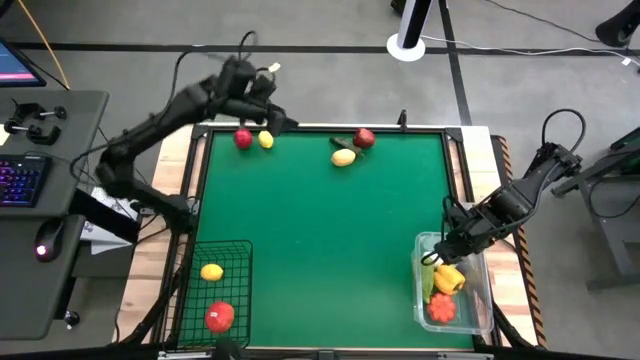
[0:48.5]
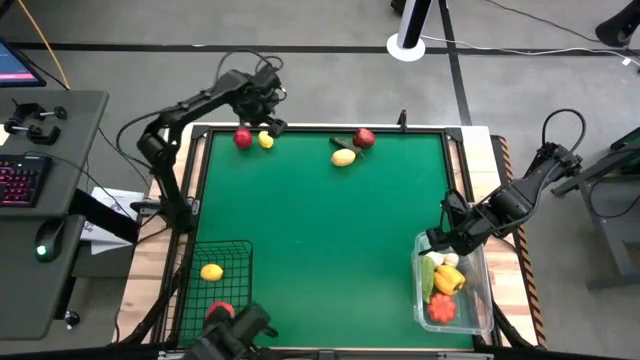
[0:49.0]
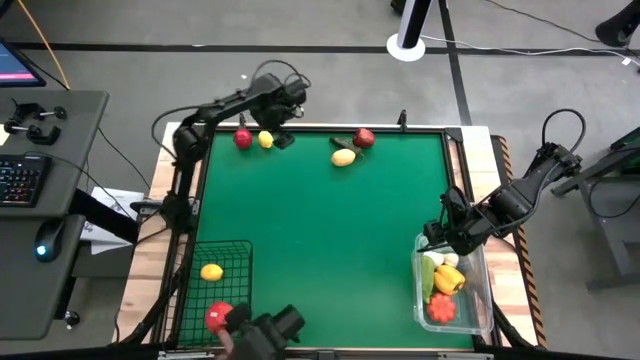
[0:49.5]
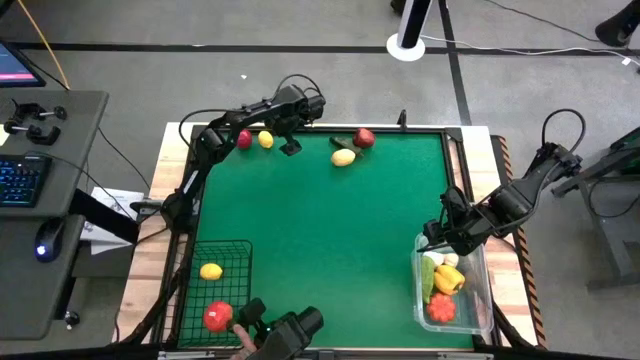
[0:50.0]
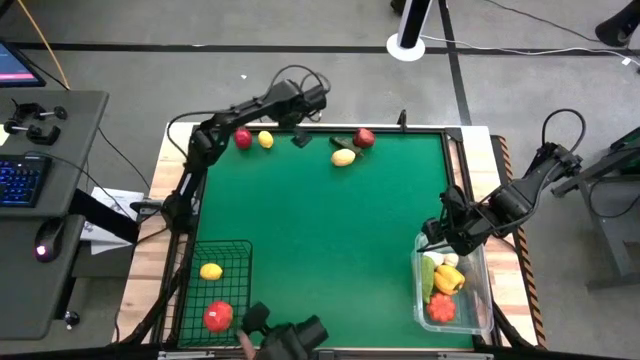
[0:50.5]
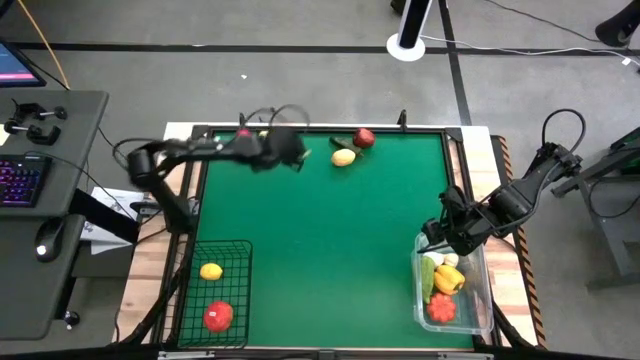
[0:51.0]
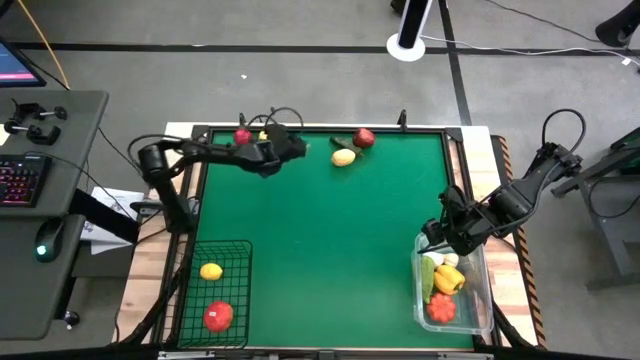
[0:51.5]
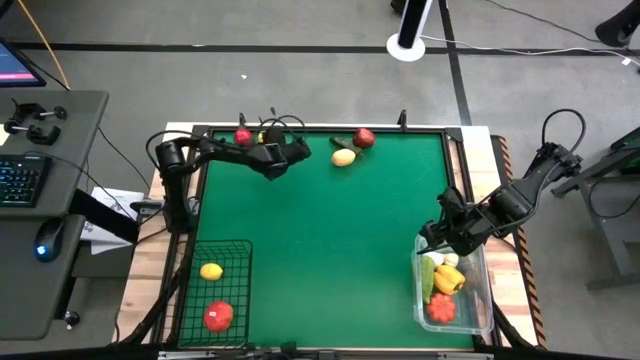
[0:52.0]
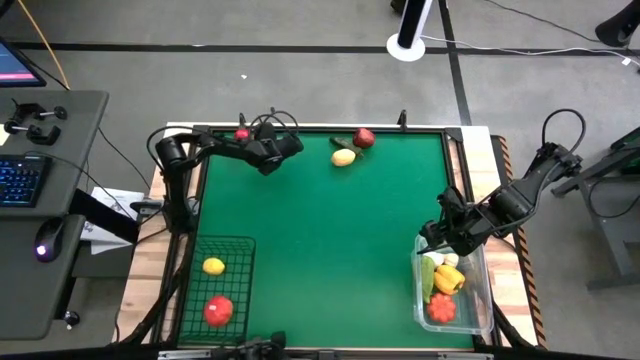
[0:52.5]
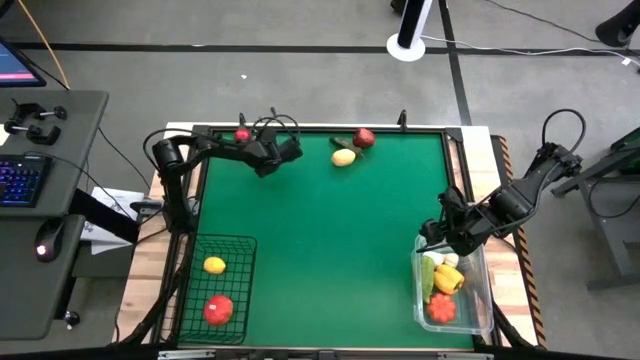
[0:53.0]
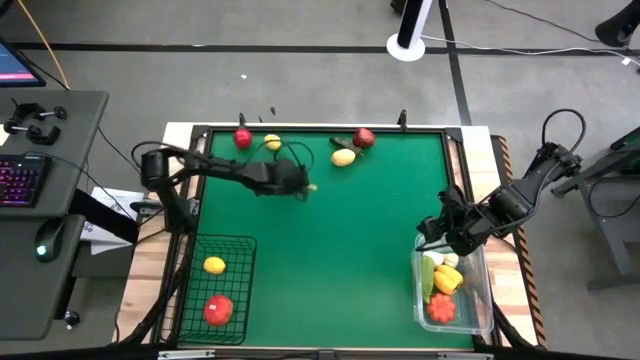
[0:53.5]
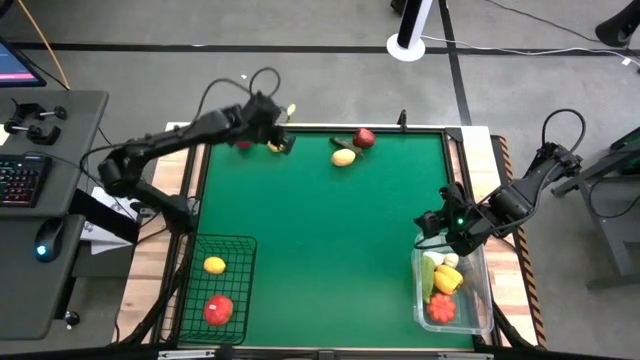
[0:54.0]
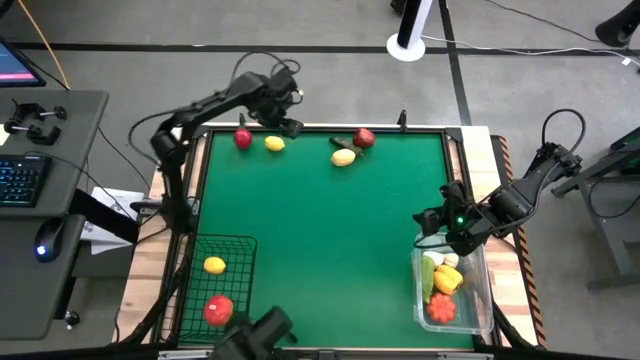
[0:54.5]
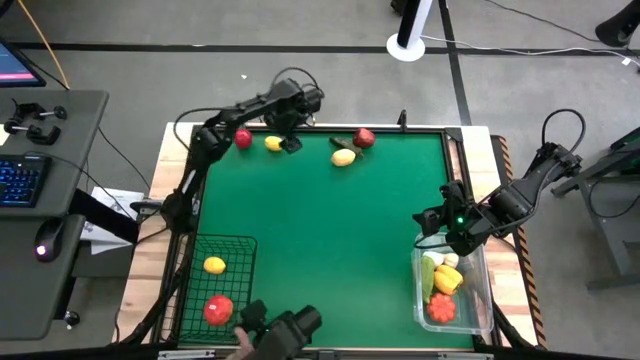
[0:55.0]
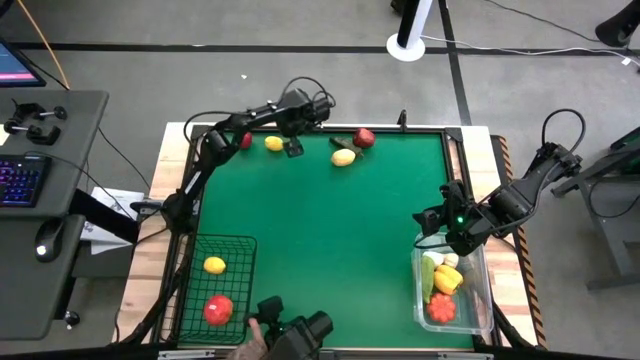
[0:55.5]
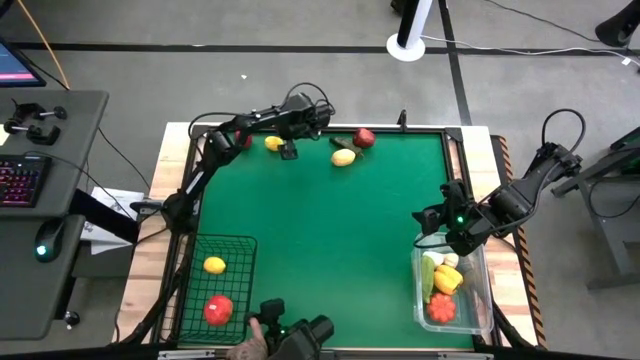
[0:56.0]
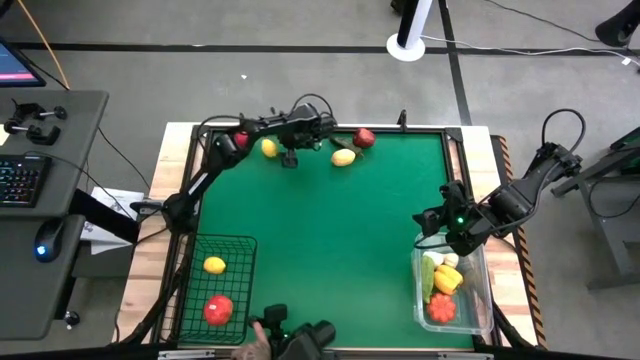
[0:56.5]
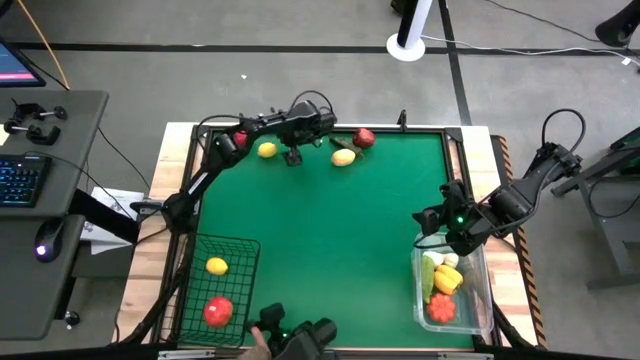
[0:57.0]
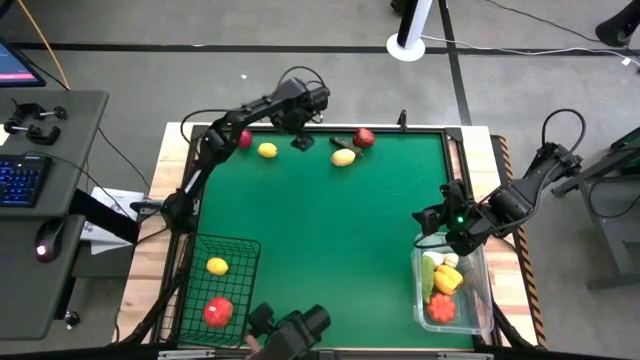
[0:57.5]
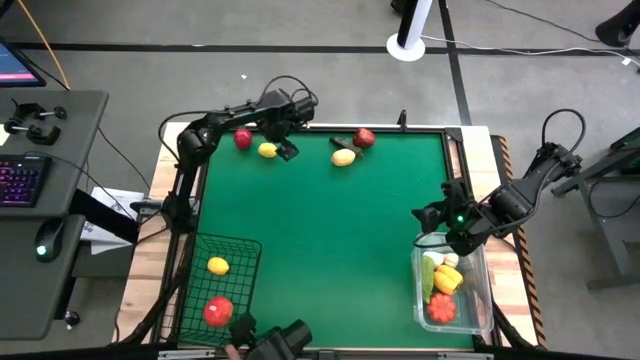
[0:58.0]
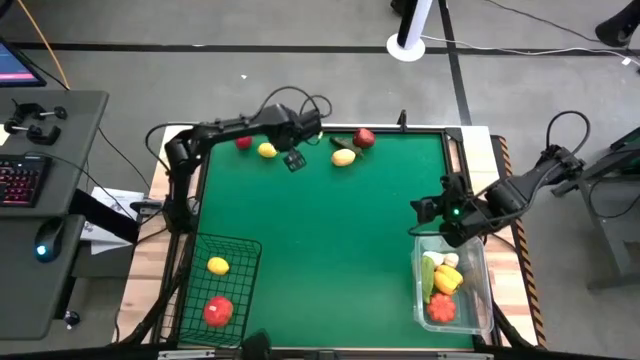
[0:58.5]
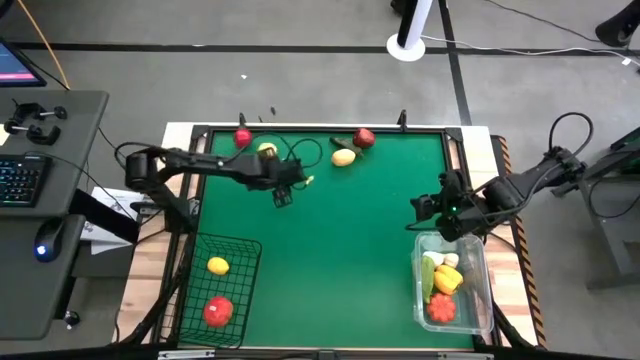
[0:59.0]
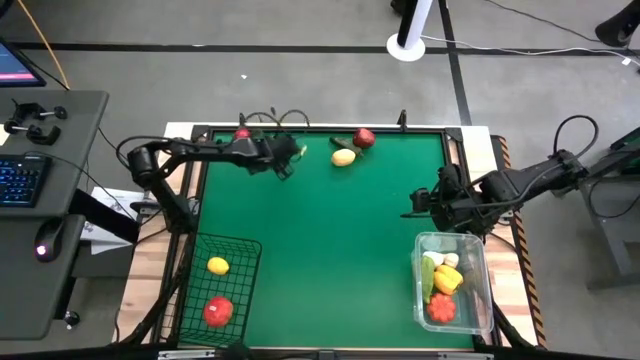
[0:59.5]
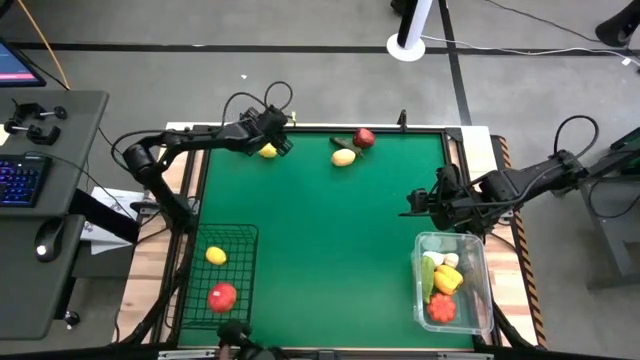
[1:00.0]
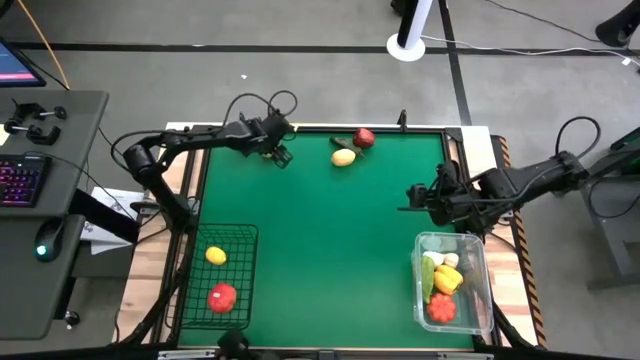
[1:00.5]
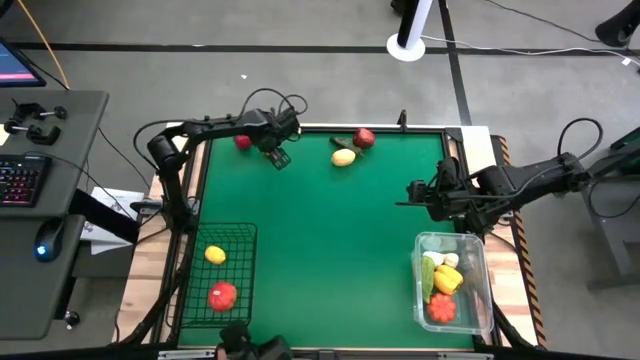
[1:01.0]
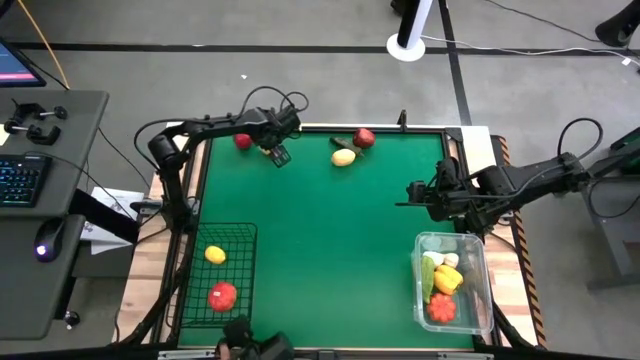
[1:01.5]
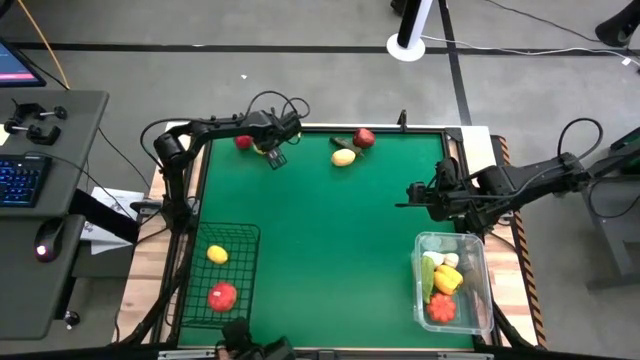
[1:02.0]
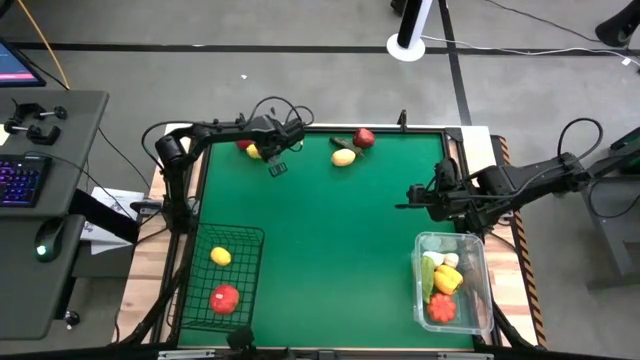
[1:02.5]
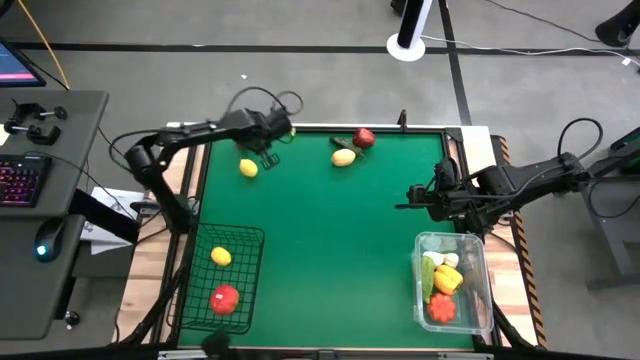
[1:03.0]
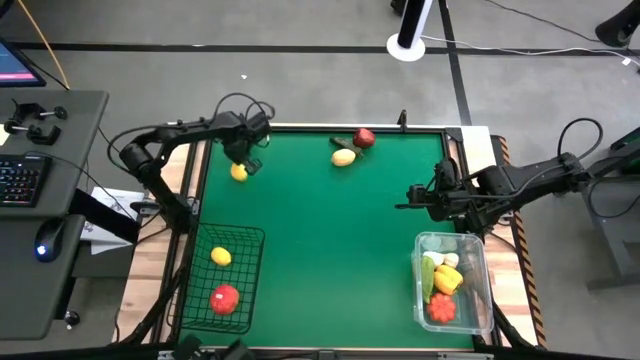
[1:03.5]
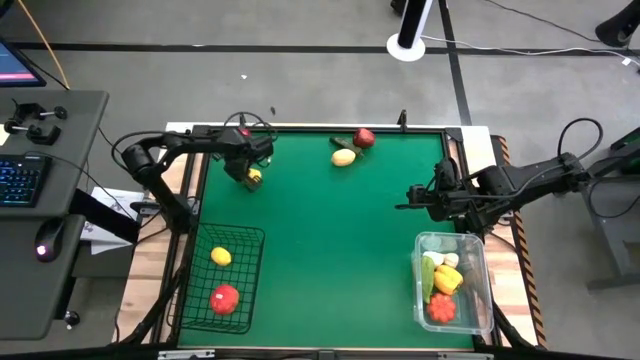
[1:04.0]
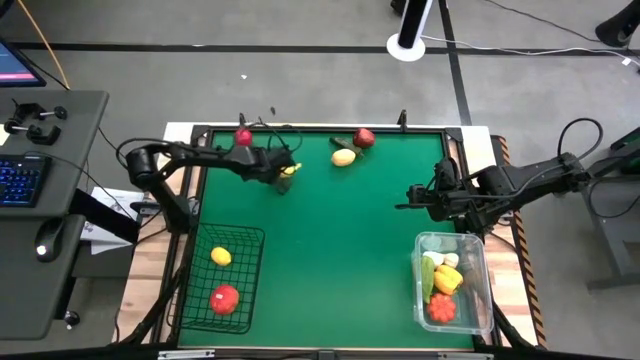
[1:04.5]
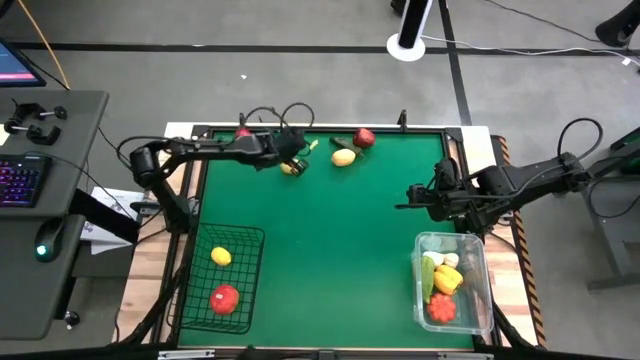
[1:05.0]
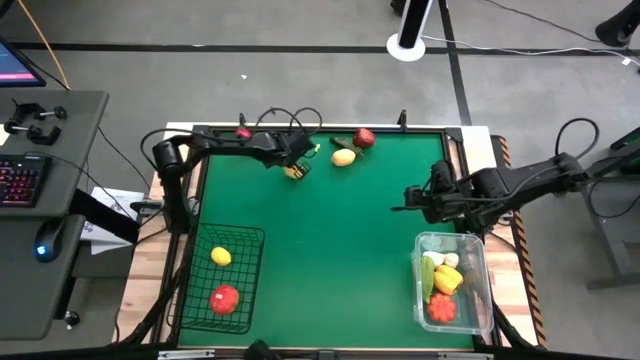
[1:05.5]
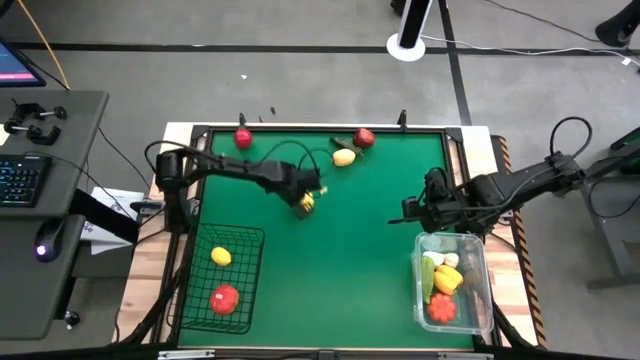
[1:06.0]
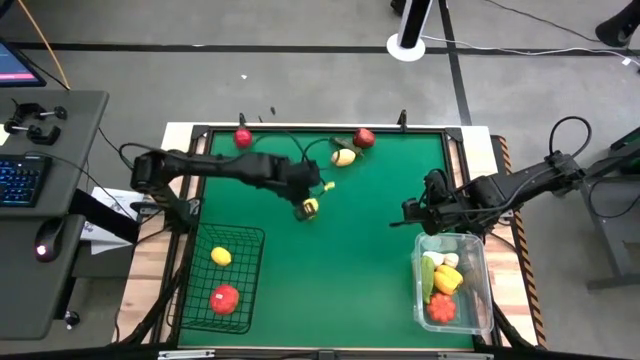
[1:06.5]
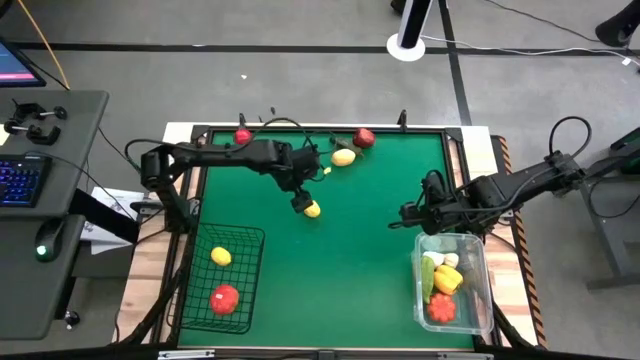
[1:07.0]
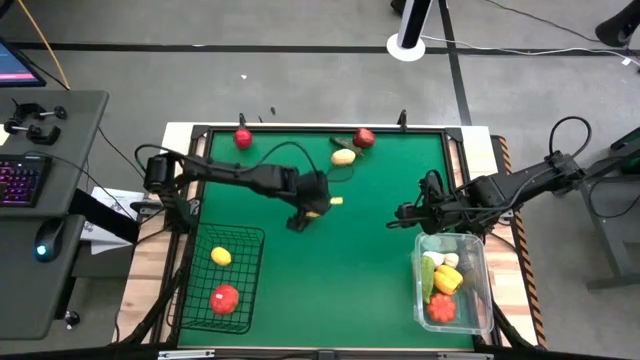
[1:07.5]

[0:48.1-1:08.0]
Task: Sort produce into baskets
Put the yellow lemon into the black wire basket

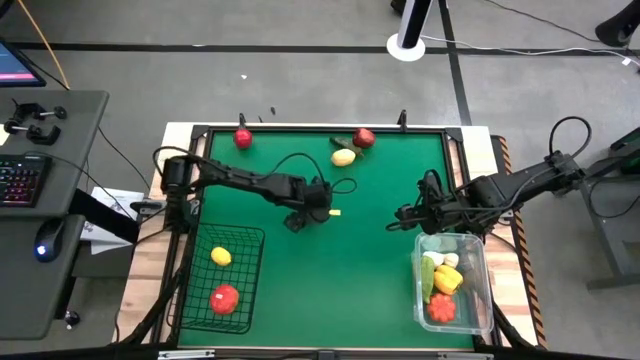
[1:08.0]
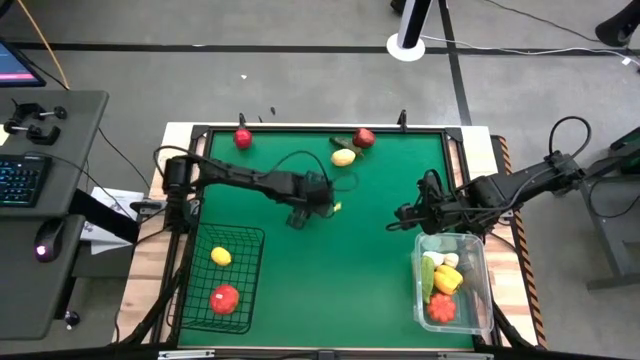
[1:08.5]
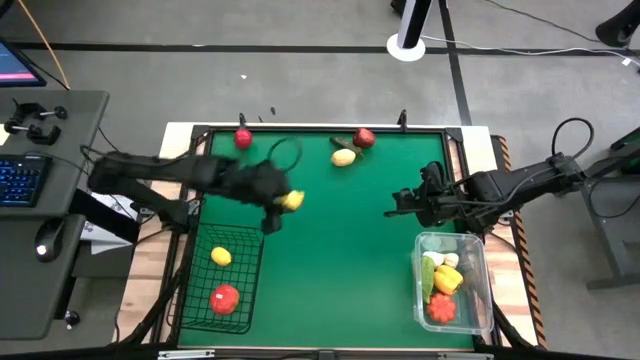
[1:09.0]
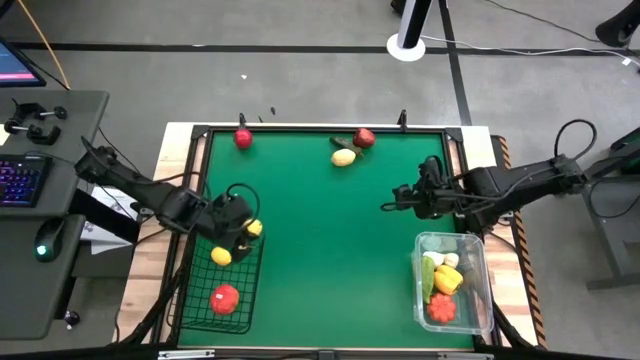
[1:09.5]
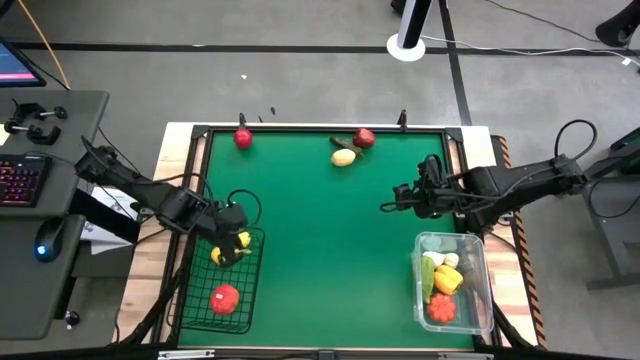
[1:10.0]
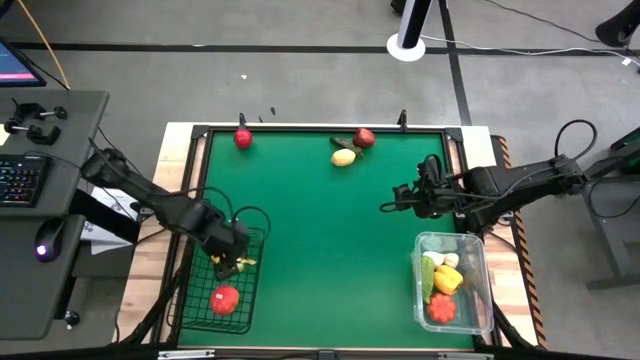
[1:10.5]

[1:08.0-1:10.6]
Put the yellow lemon into the black wire basket
